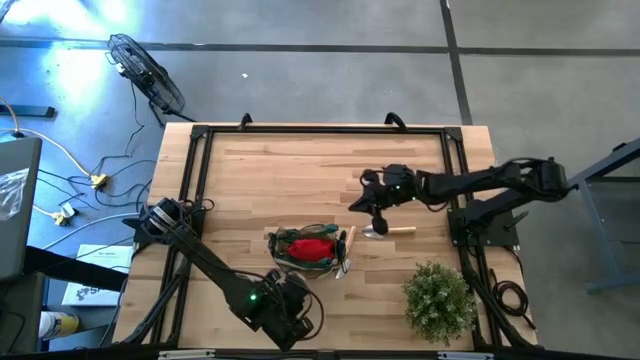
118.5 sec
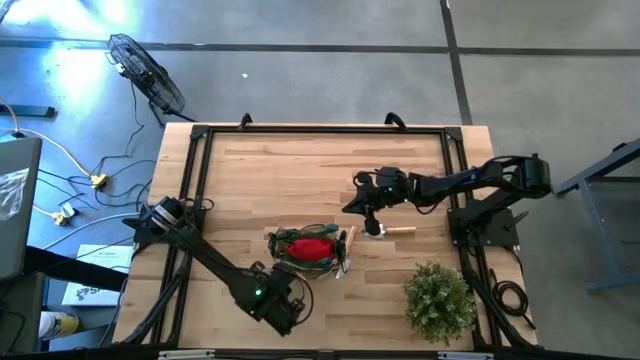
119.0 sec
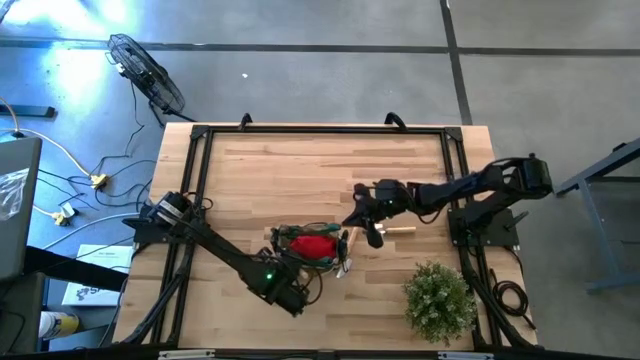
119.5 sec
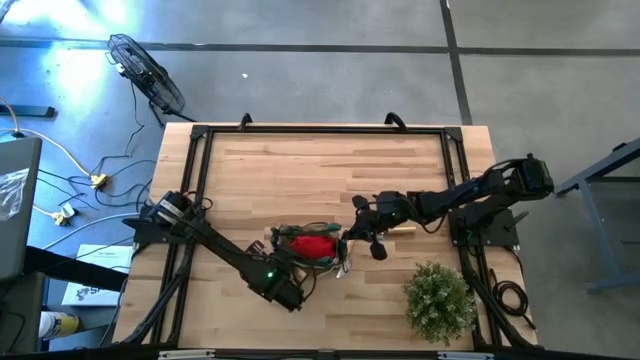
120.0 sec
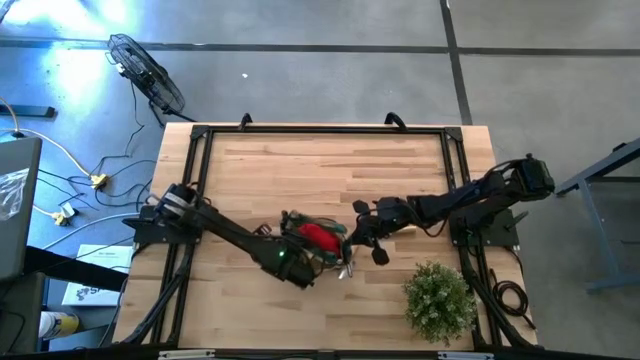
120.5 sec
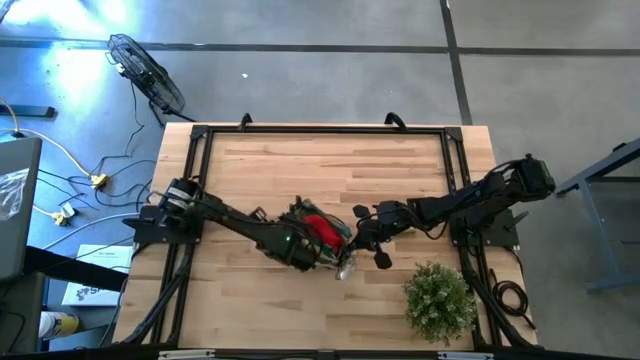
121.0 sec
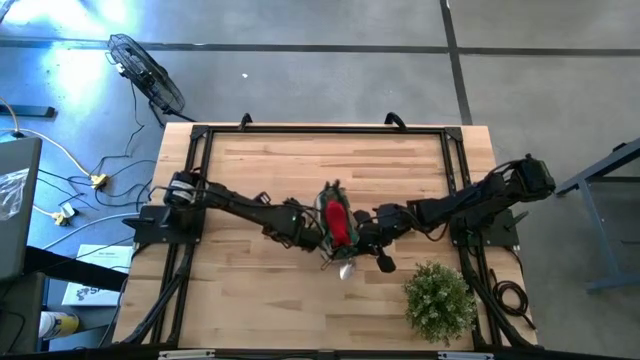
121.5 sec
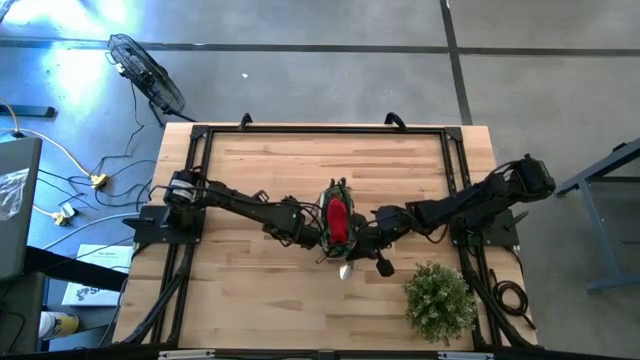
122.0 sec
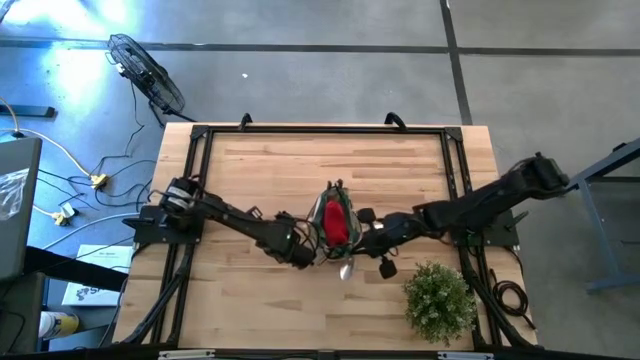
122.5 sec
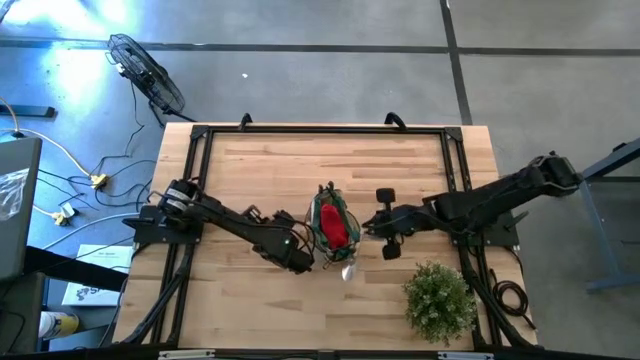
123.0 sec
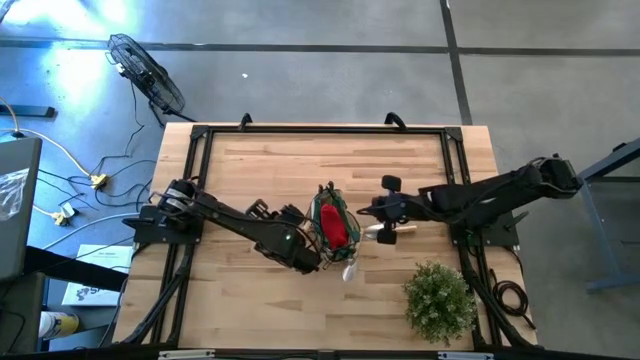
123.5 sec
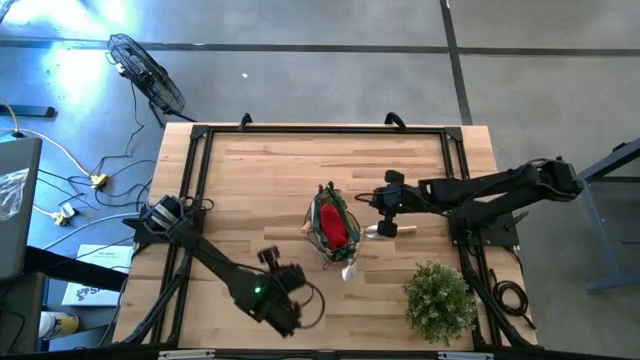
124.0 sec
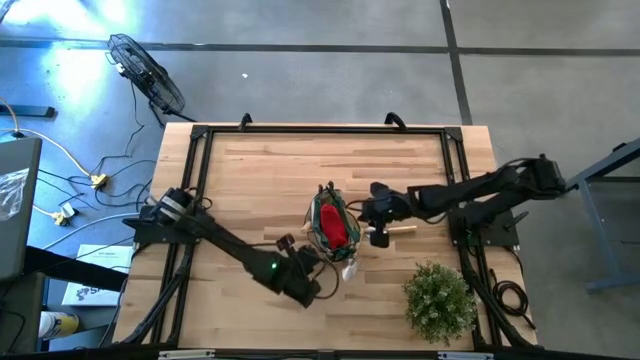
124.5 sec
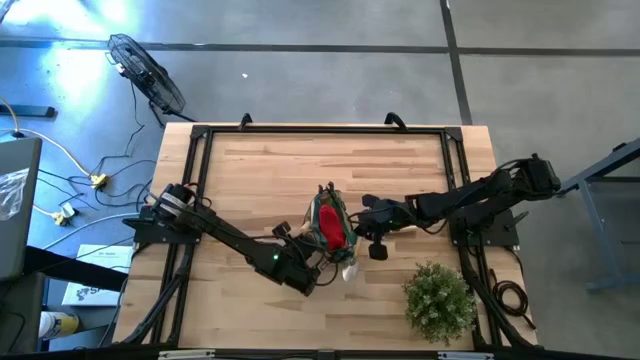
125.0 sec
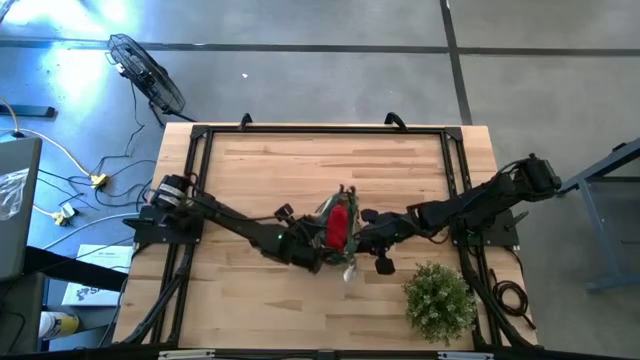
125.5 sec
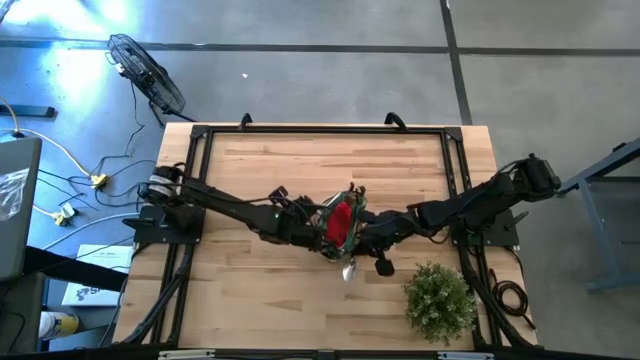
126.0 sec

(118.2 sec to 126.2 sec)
Task: Pick & Place Garden tools in Gardening bag
Adjust the green gardening bag

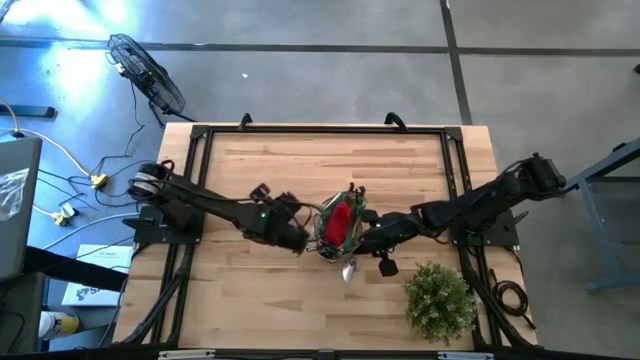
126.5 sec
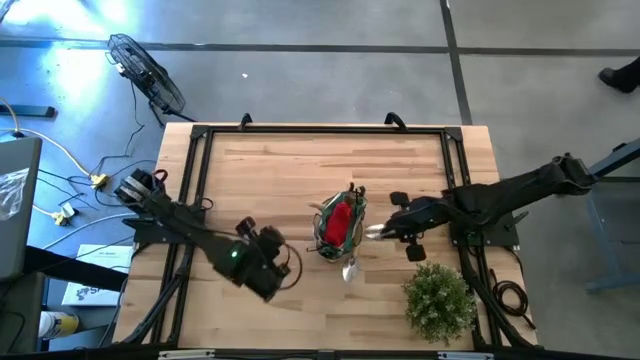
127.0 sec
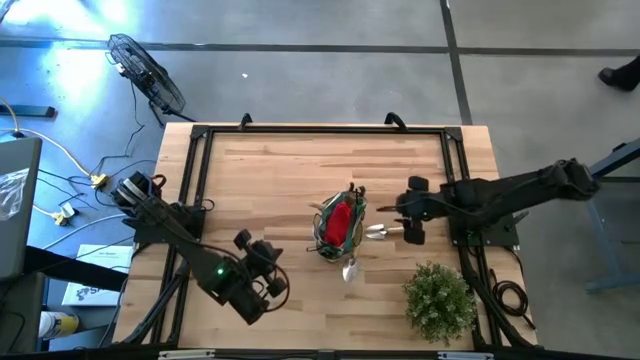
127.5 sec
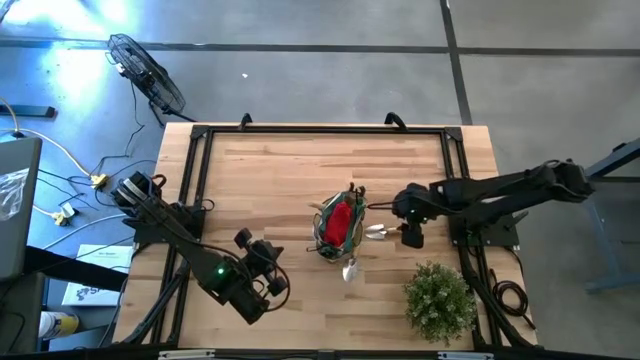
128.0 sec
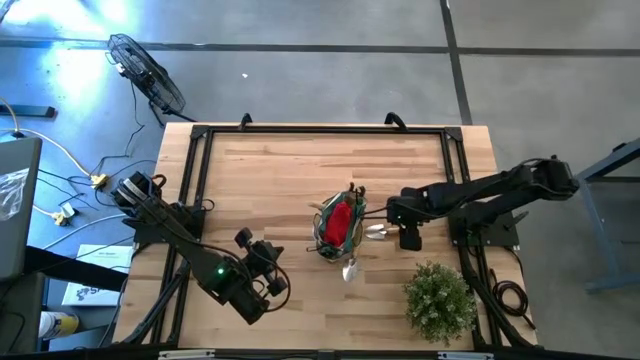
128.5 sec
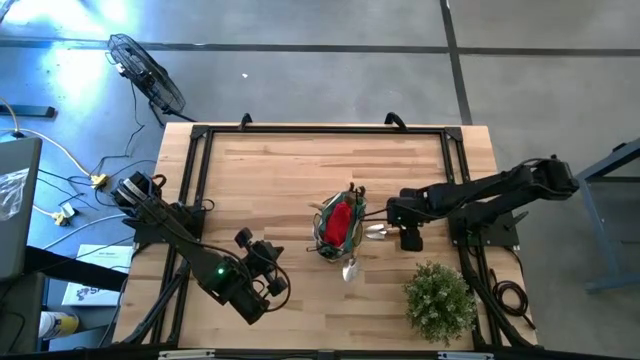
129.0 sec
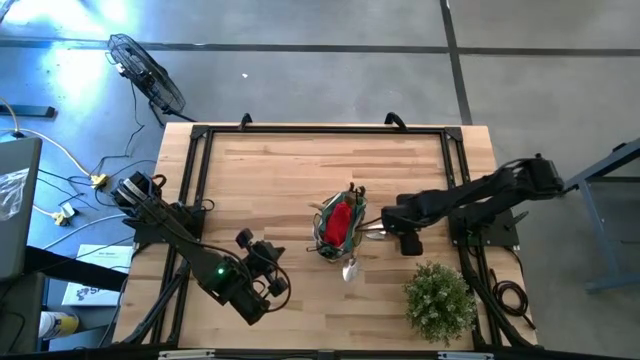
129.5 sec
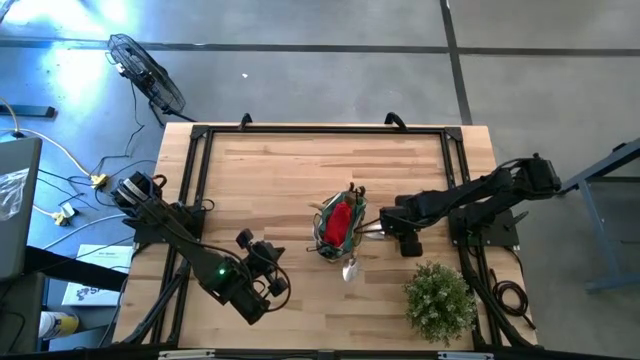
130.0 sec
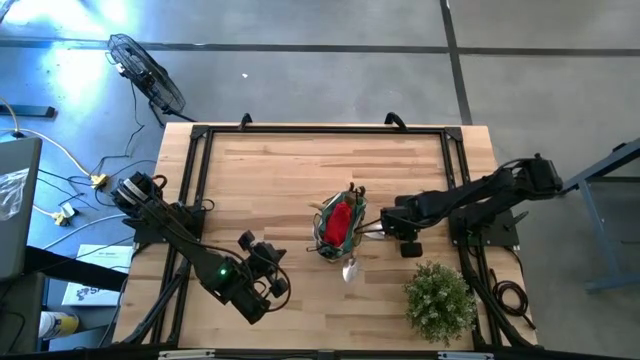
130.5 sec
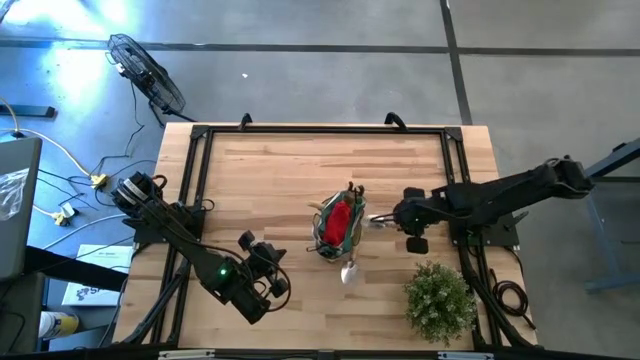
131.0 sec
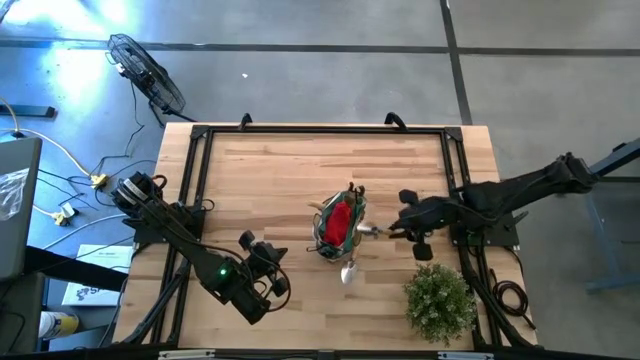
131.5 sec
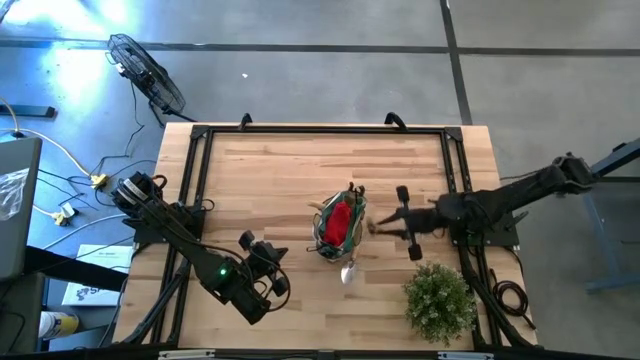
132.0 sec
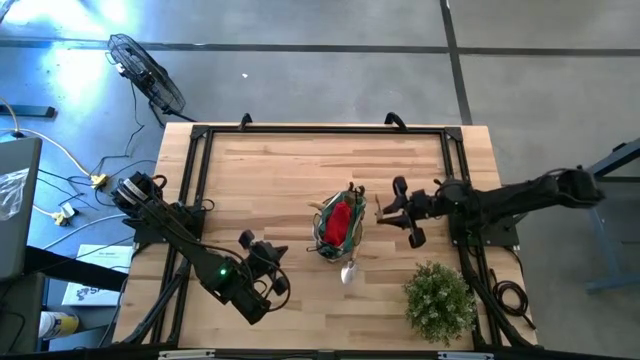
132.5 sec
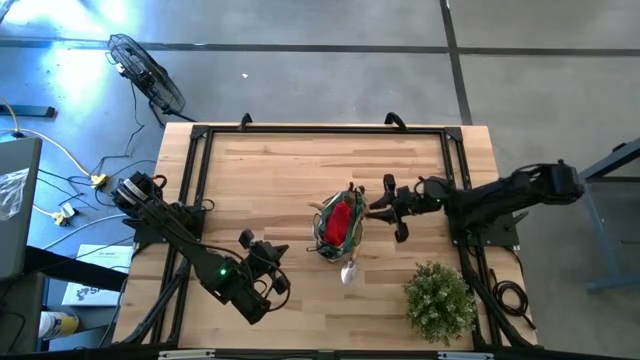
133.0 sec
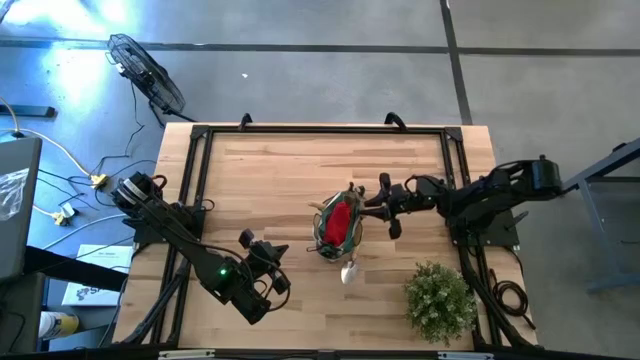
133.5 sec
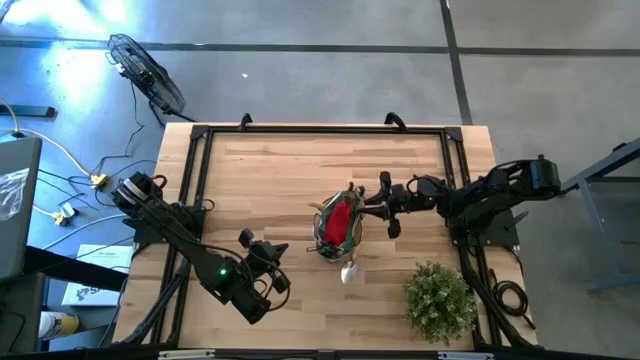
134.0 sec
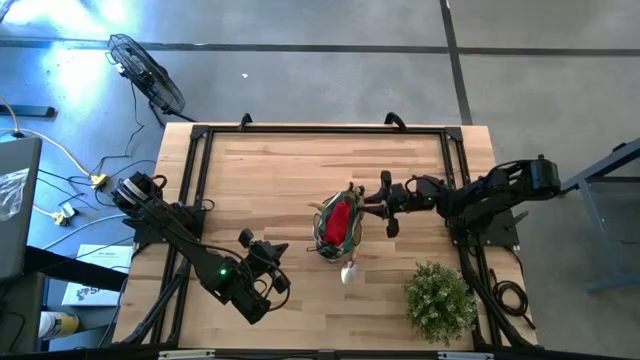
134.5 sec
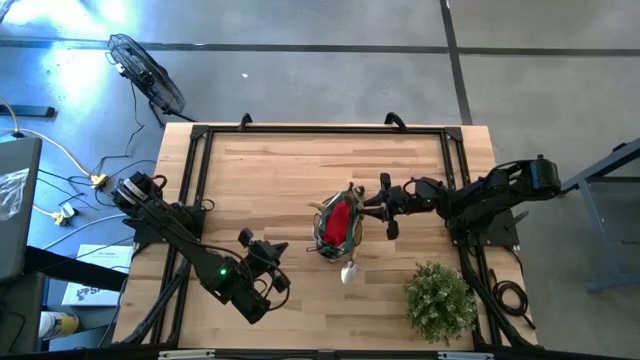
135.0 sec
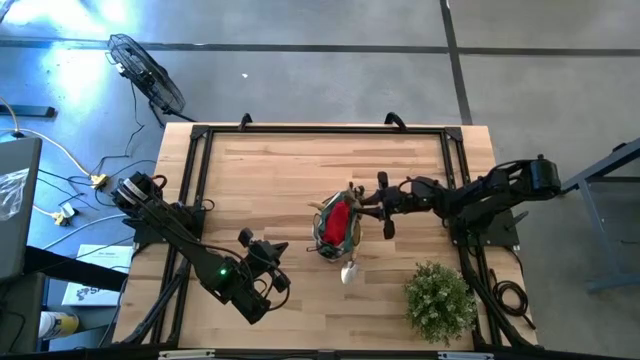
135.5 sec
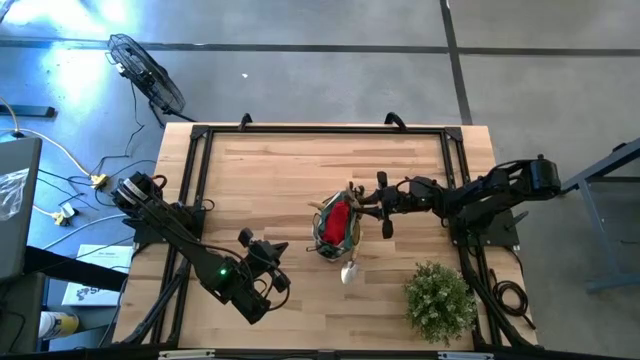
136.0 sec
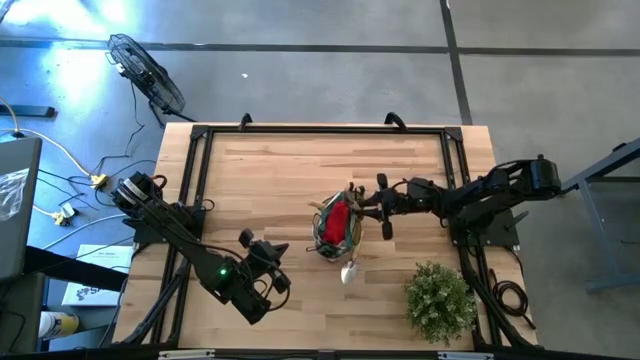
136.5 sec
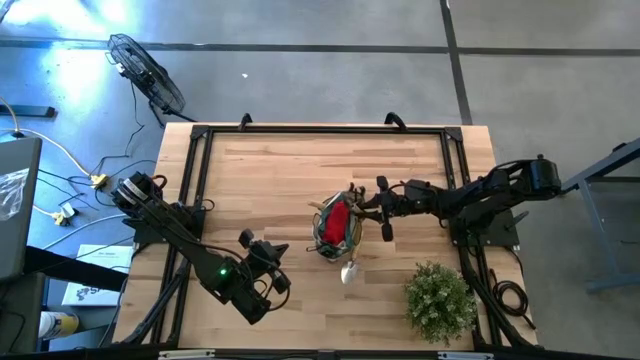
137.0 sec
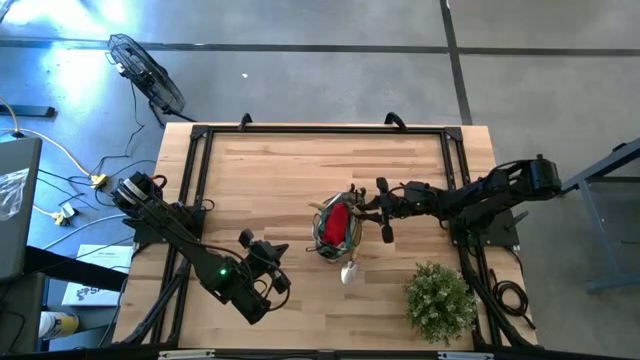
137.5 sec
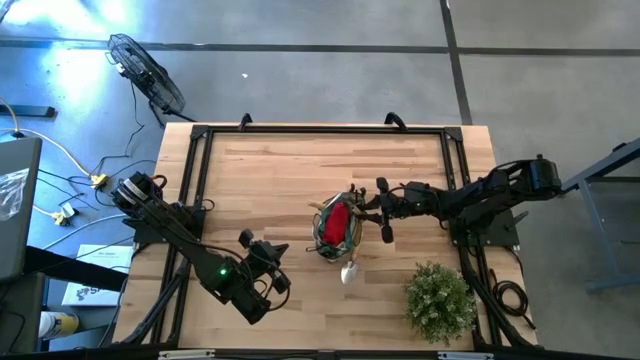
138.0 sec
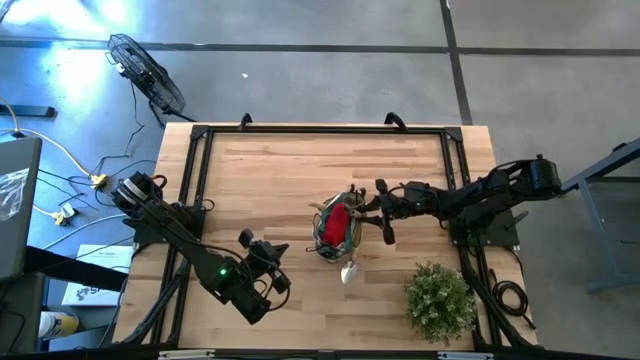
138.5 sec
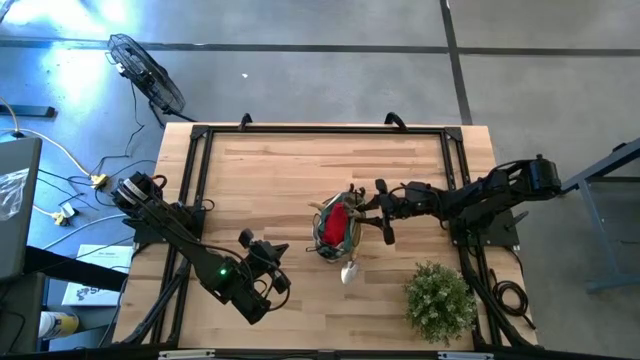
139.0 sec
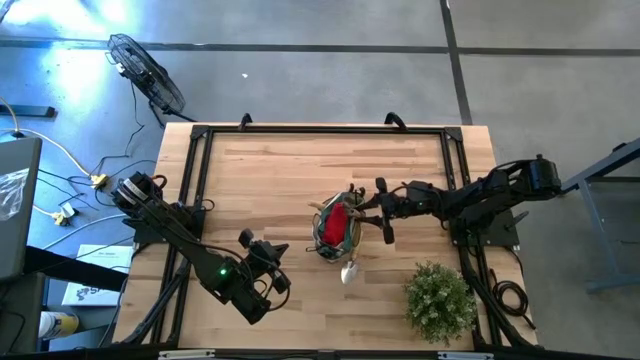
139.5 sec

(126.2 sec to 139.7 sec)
Put the right brown trowel into the green gardening bag

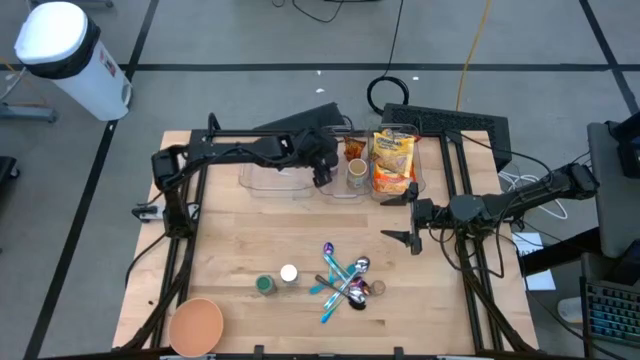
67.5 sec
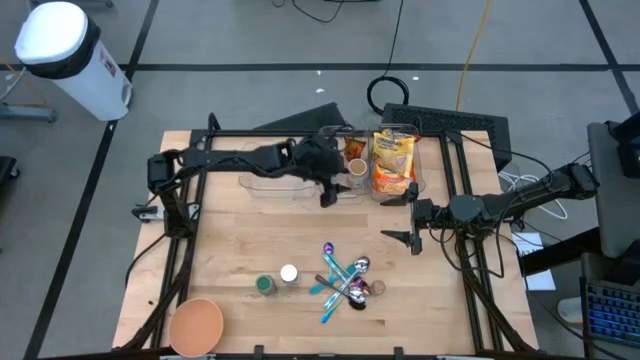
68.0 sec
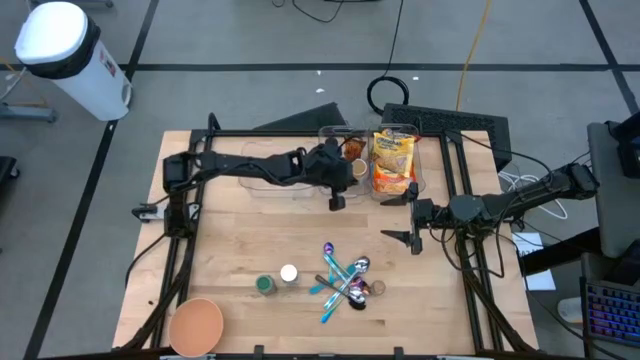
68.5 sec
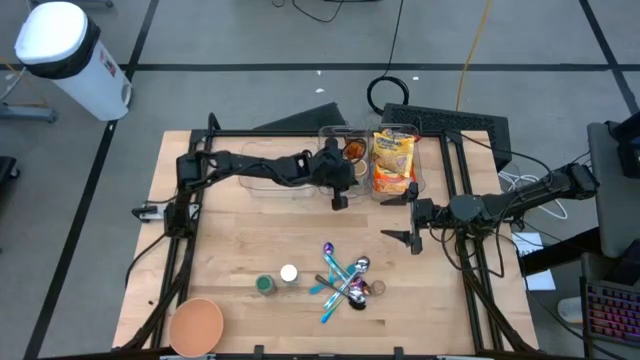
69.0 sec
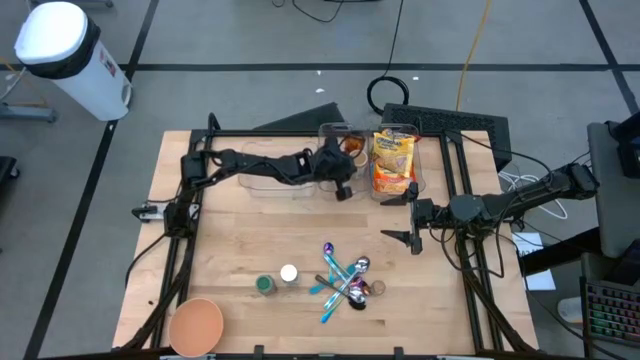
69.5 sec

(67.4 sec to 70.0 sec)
Task: Pick & Place Food Item
Adjust the gold seasoning bottle on the bin
